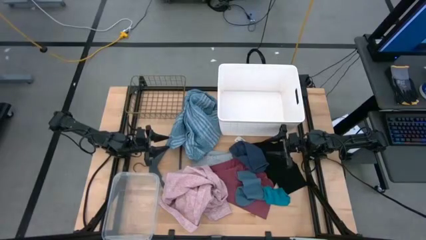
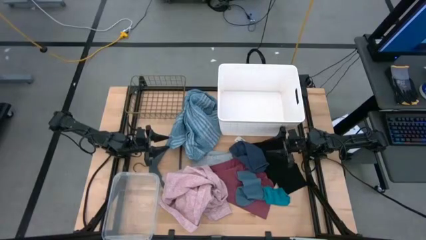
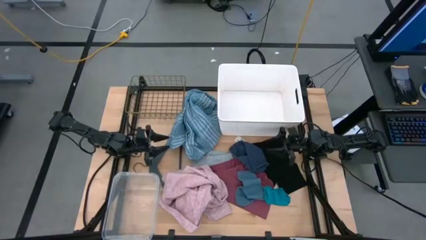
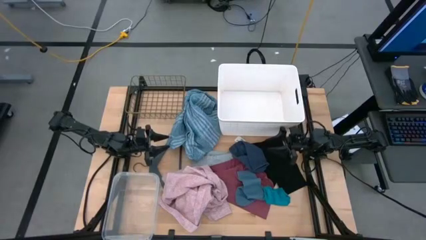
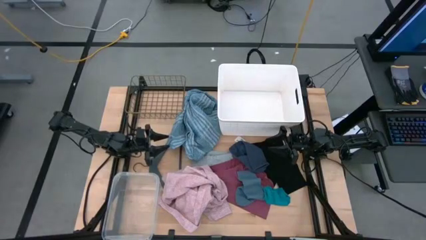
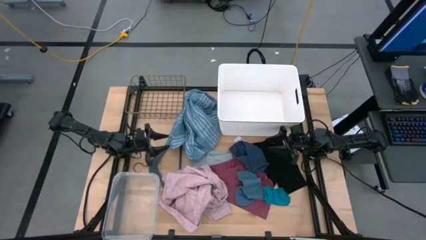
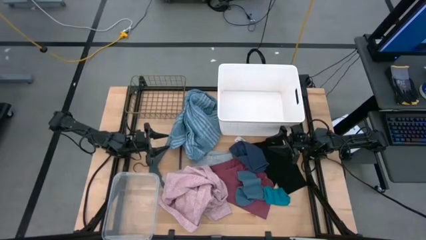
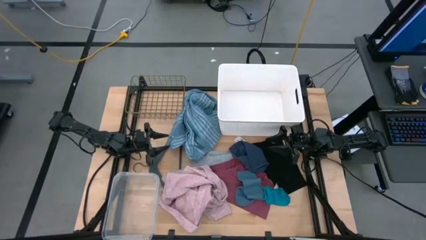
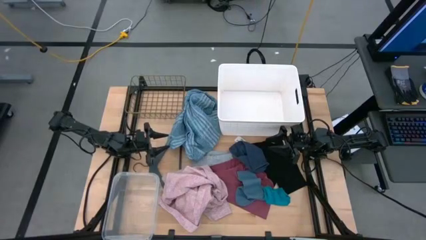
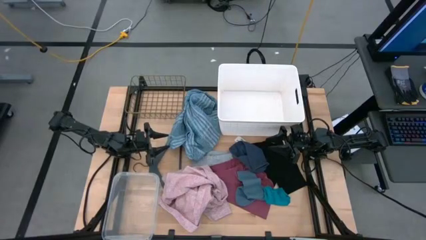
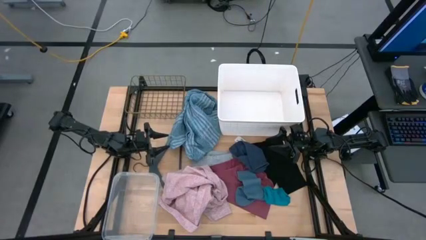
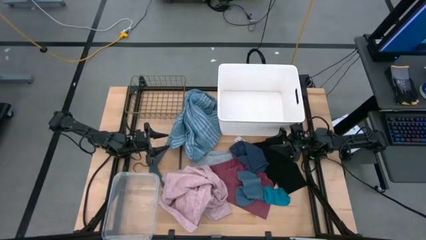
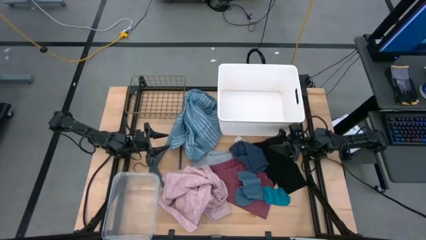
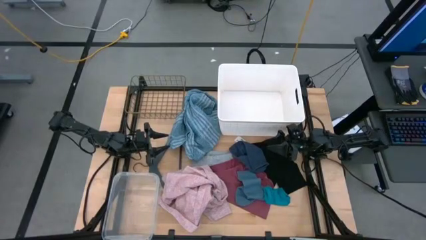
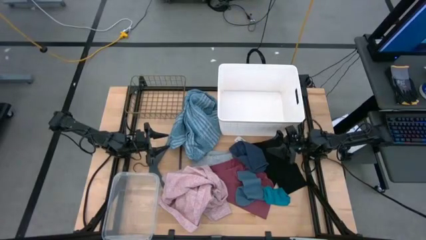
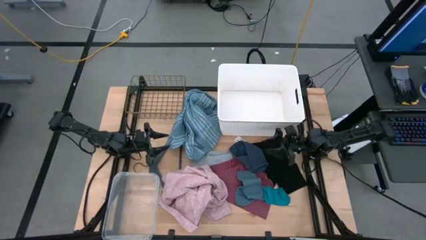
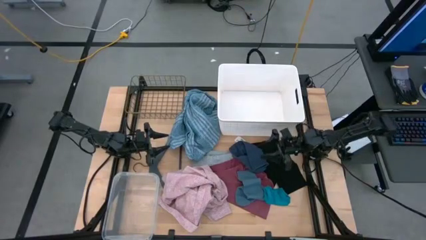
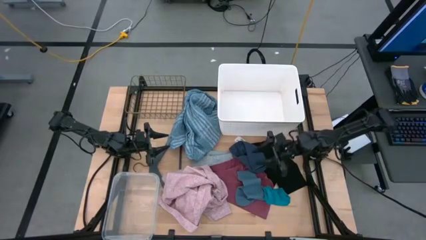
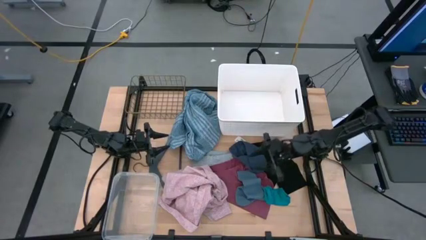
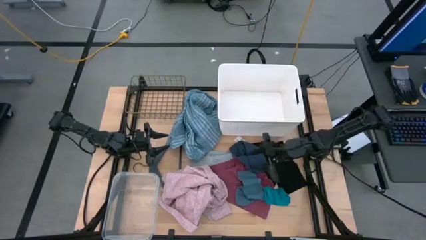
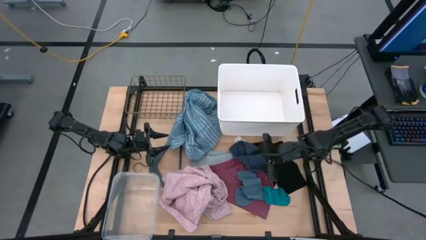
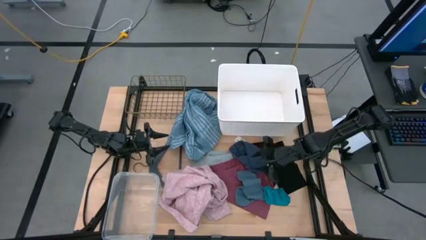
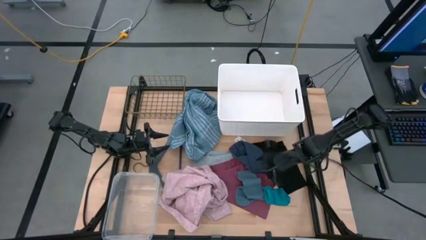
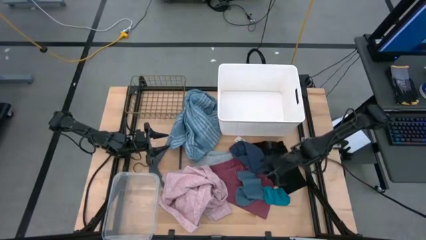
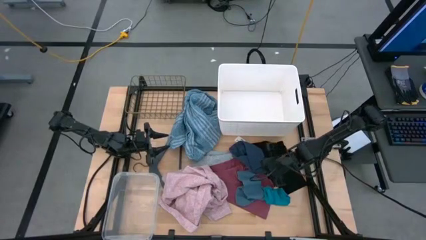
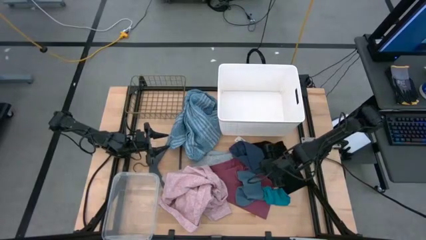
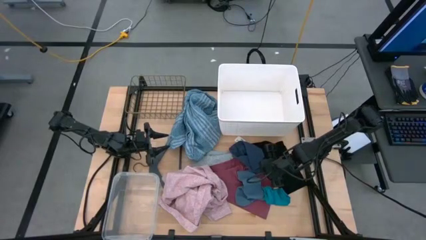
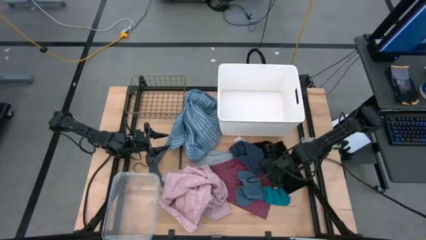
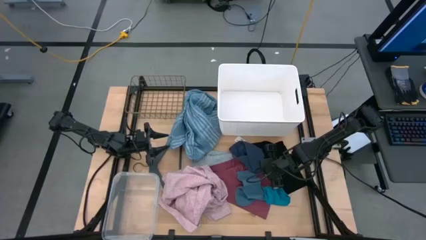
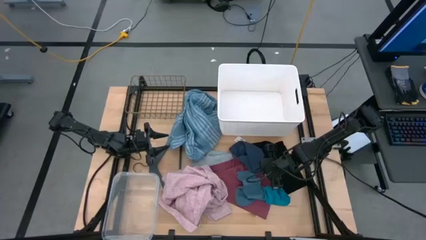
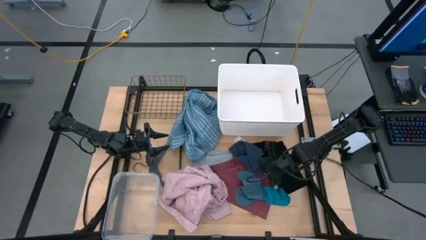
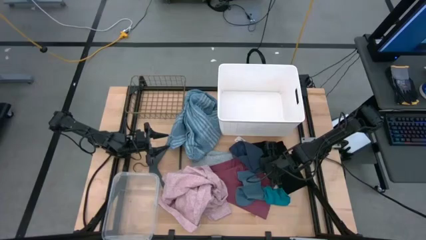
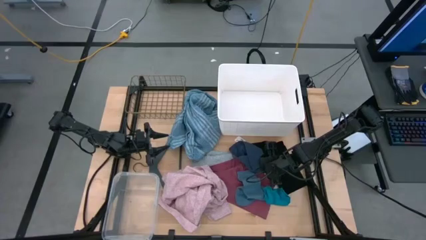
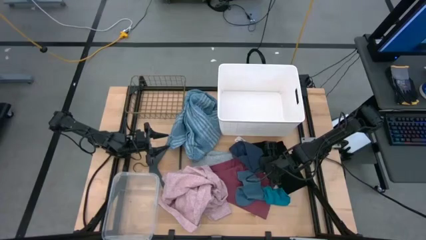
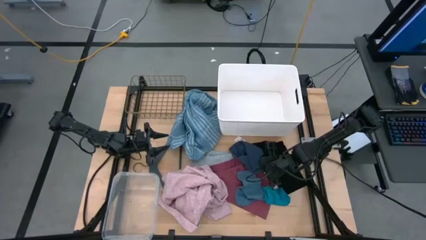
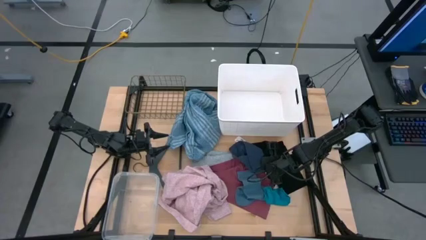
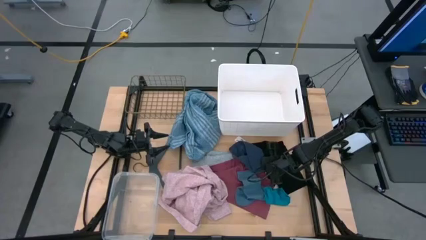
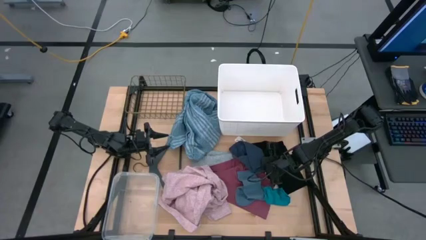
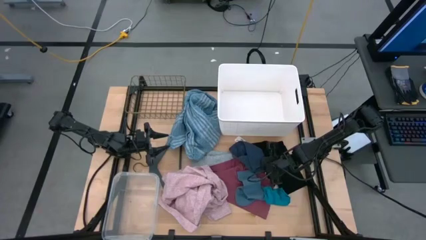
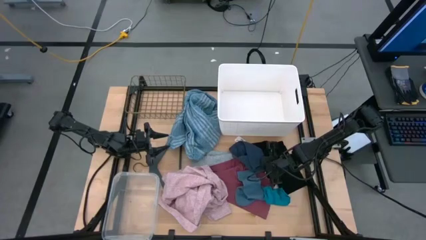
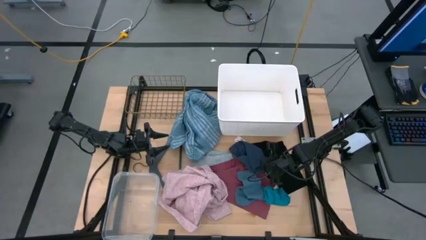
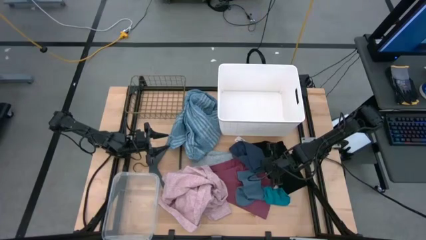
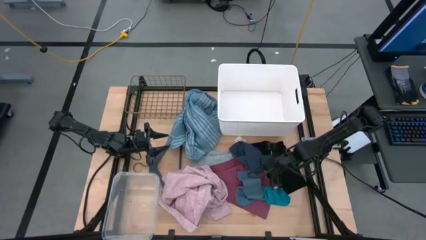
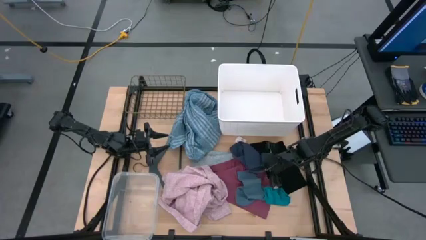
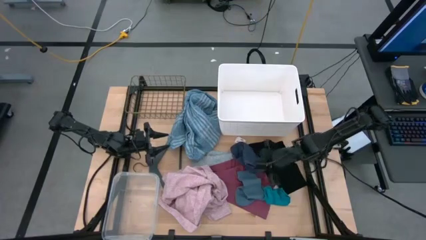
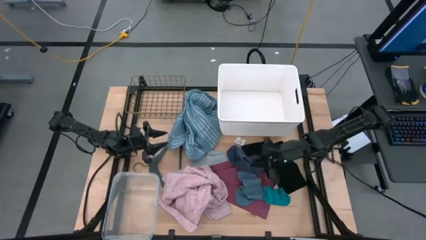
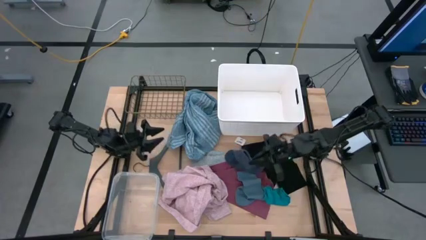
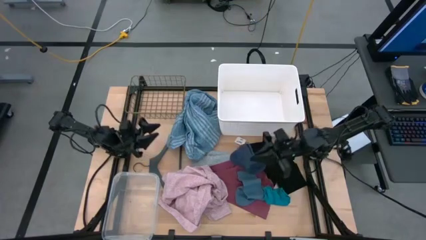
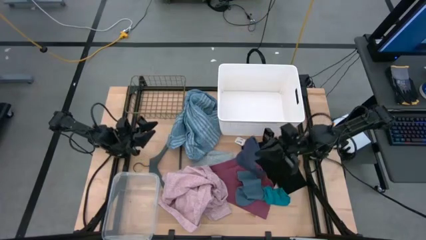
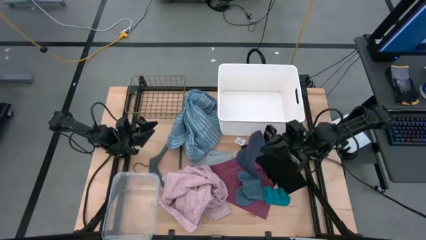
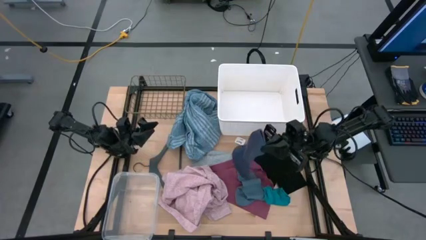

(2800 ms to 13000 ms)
Task: Pick & Place Cloths
Put the dark blue sock into the wire basket

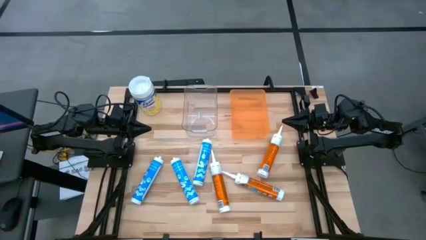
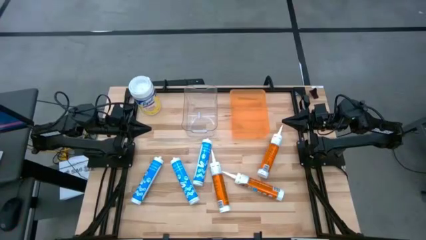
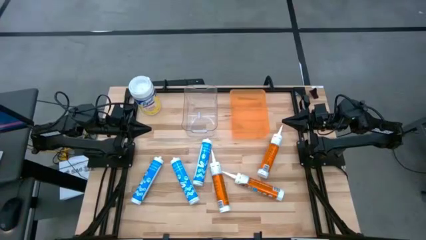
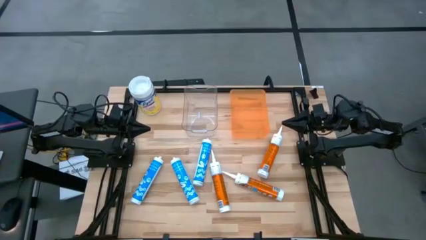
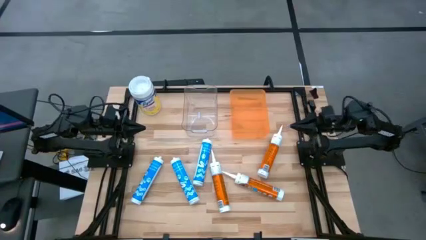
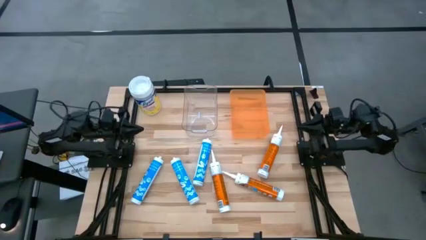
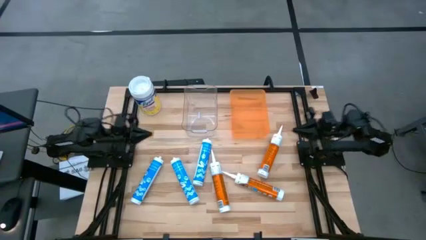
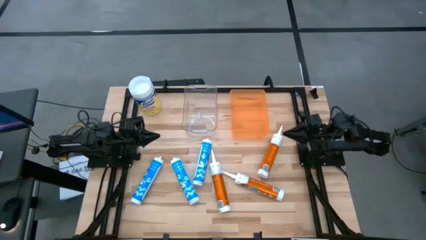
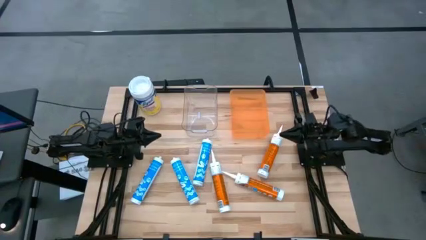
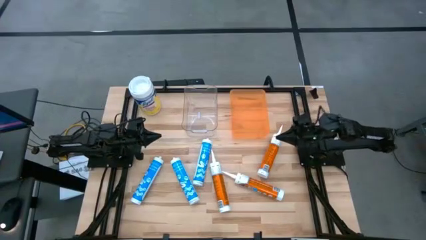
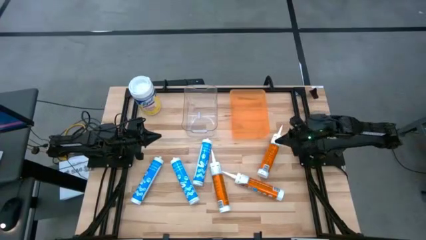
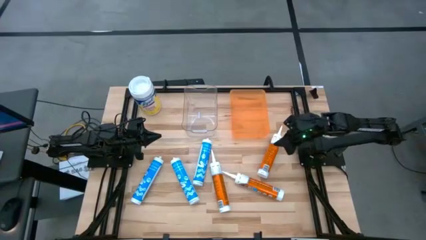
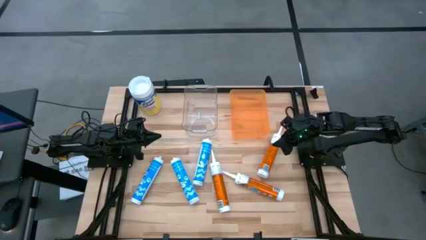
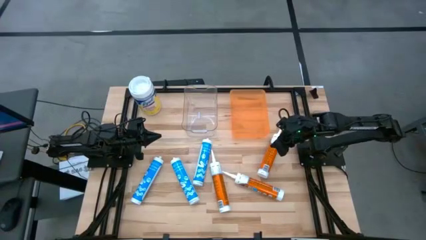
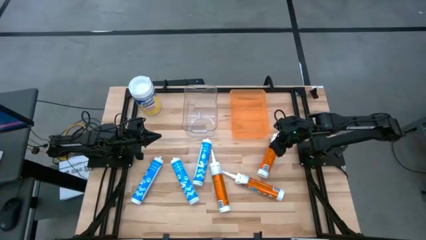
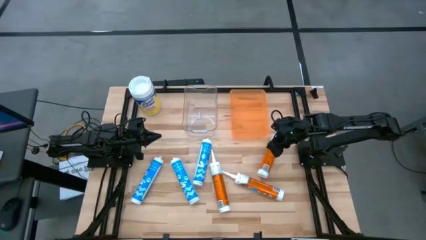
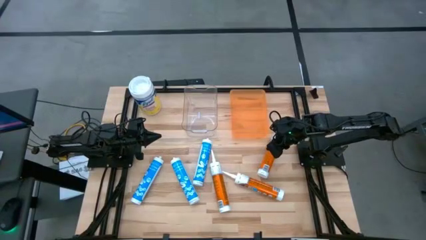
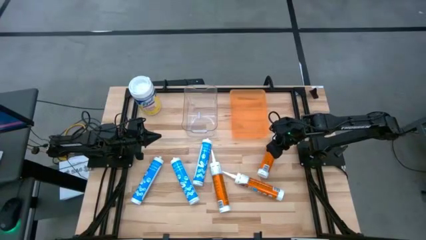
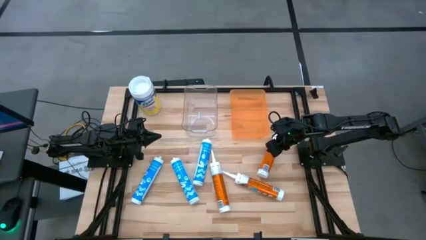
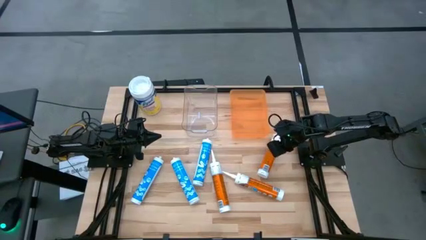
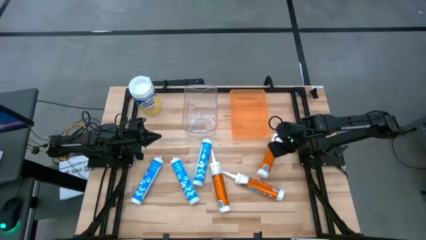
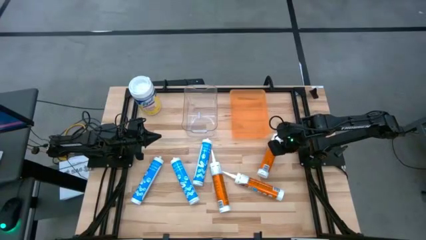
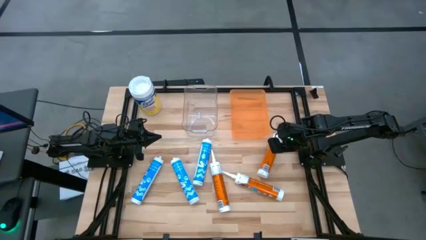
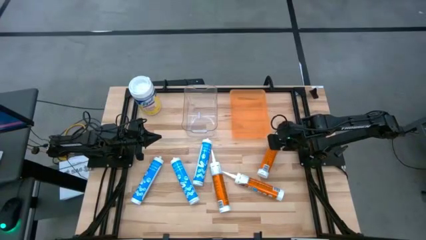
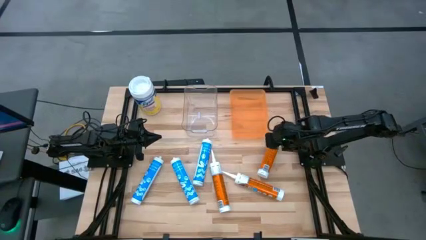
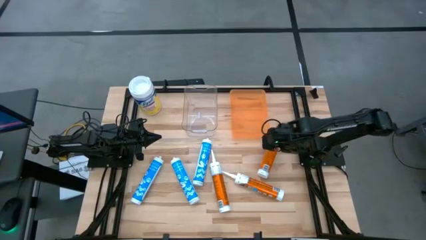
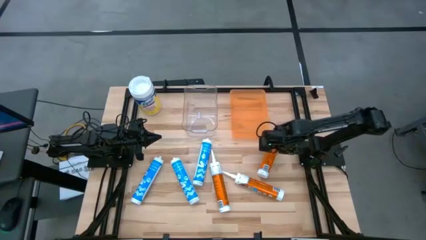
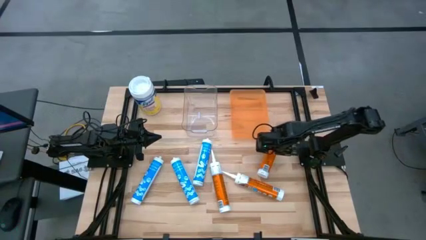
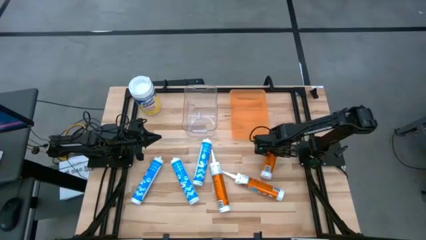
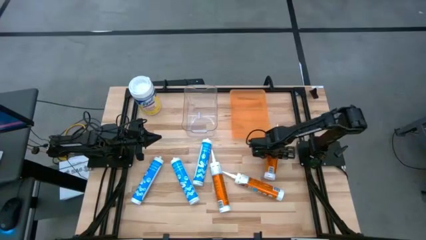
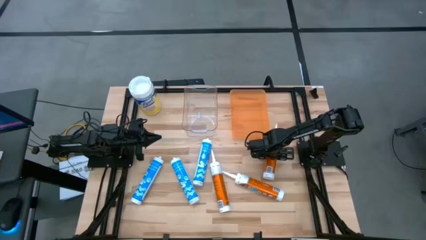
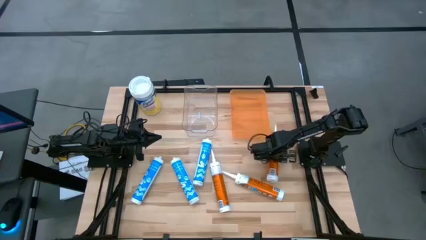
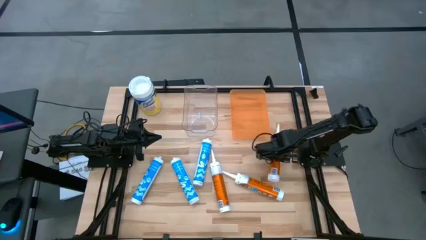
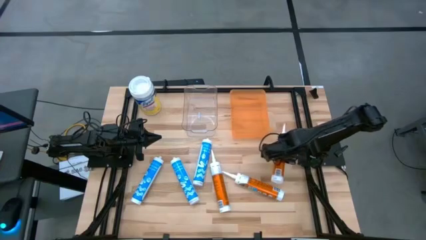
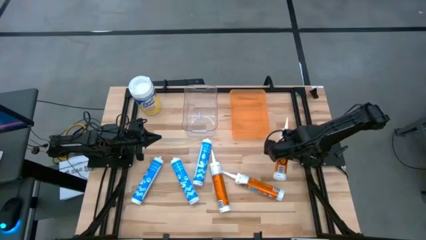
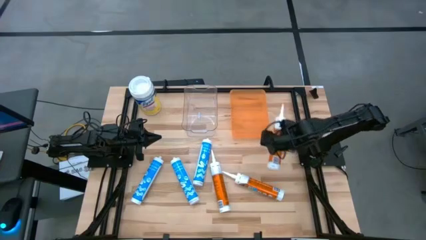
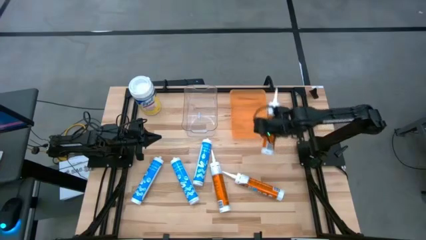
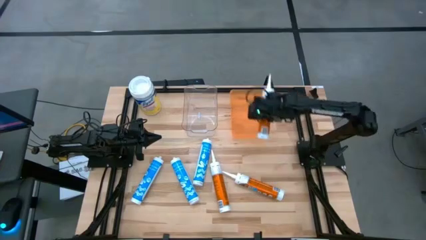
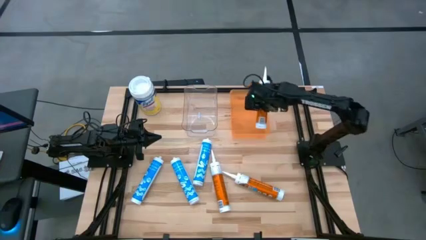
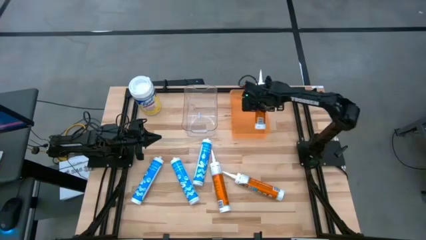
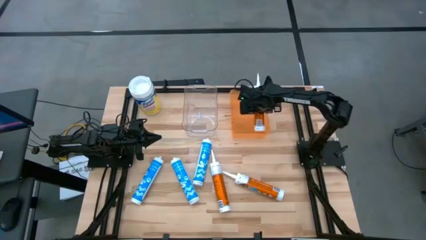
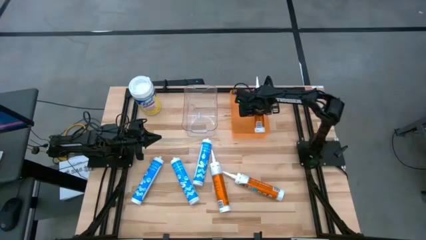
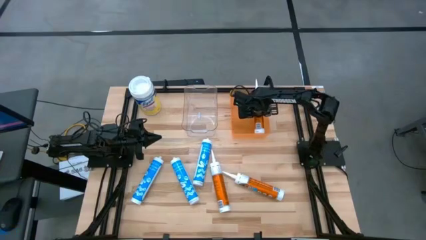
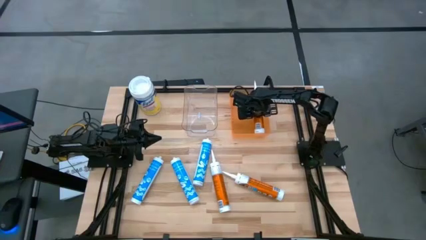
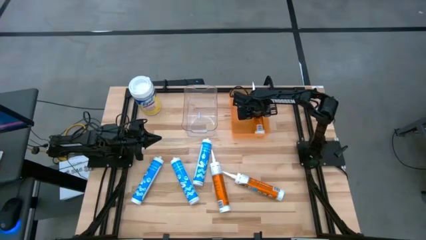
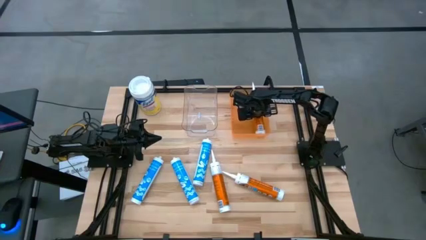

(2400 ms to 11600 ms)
Task: Pick & place silicon tubes, Sealant and Lysol wipes
Put the top orange sealant into the orange bin
